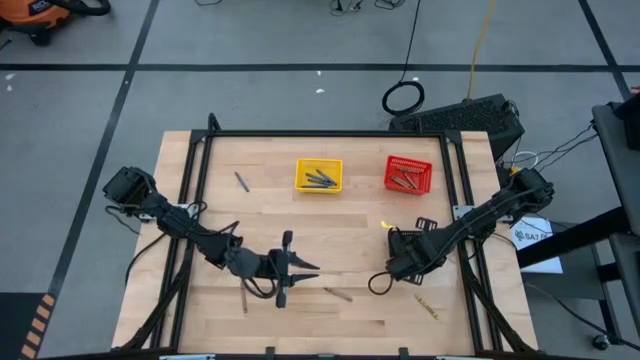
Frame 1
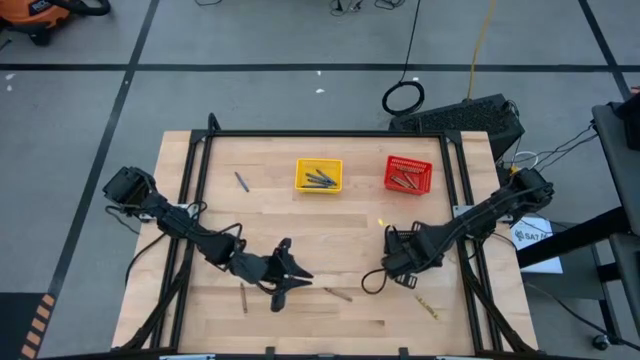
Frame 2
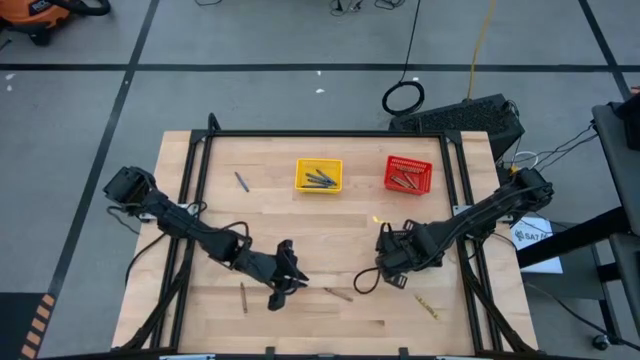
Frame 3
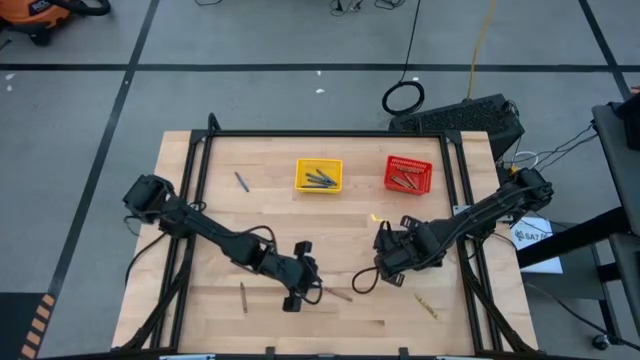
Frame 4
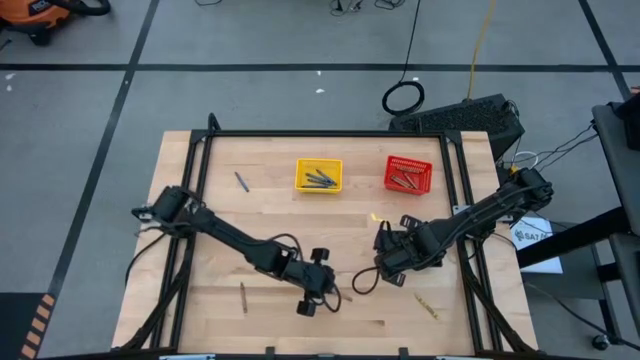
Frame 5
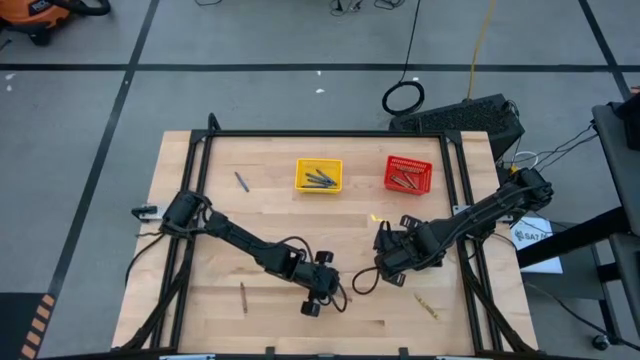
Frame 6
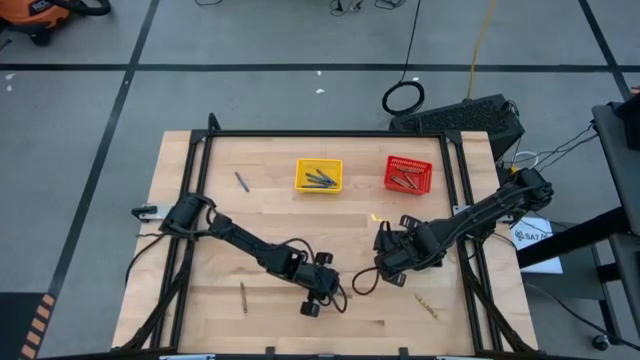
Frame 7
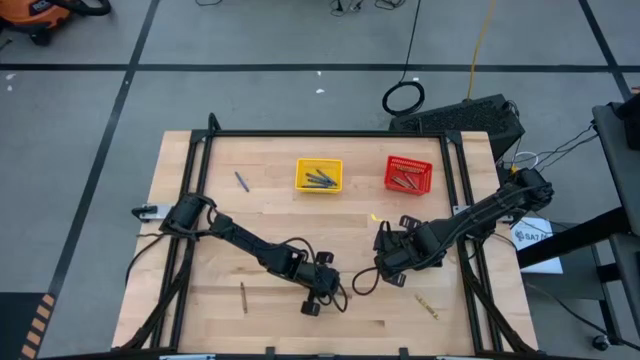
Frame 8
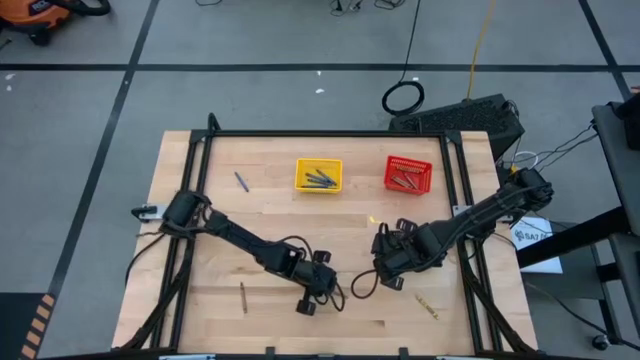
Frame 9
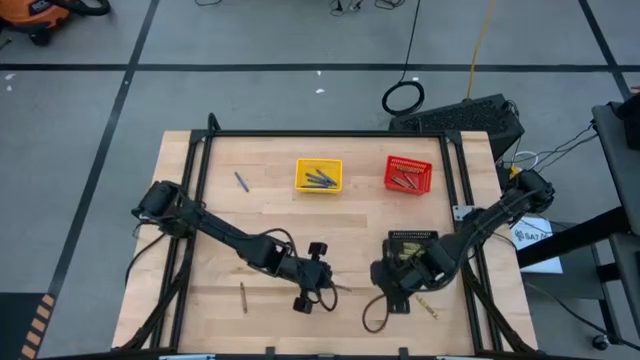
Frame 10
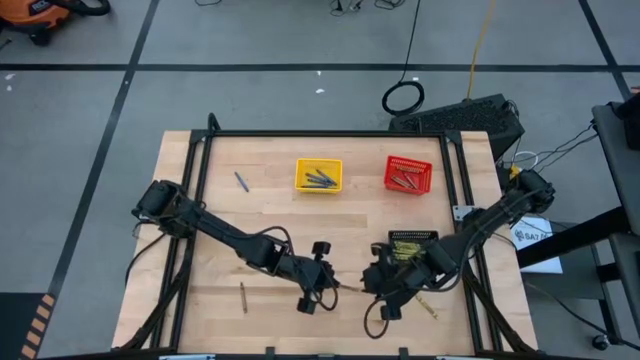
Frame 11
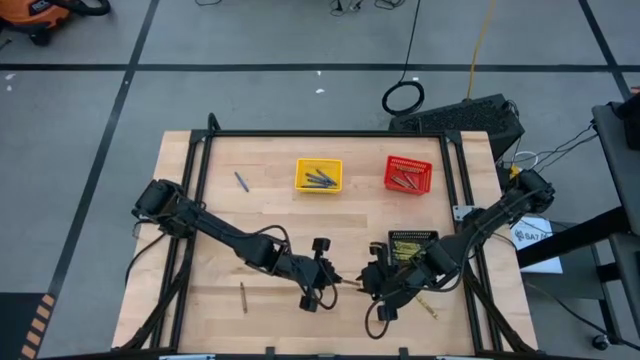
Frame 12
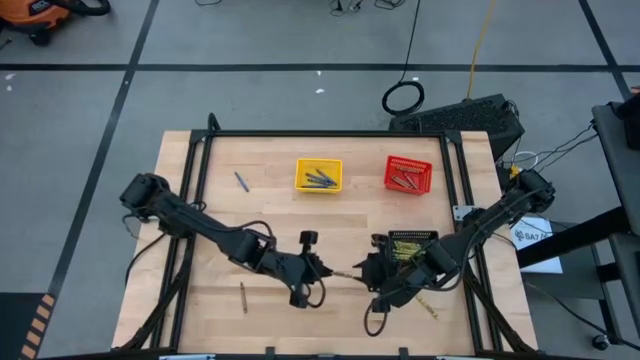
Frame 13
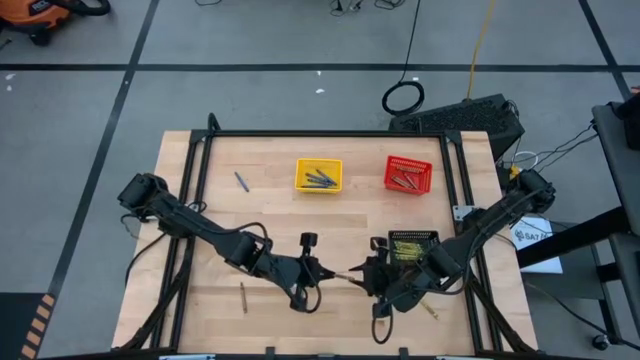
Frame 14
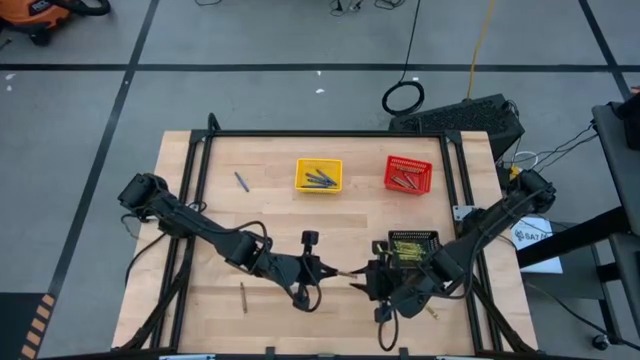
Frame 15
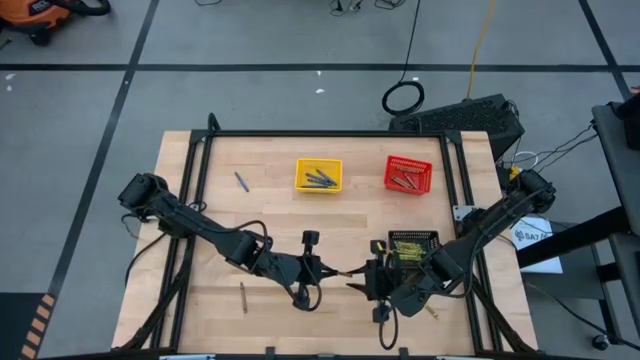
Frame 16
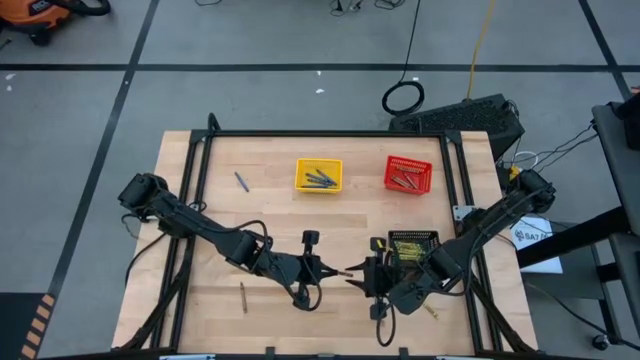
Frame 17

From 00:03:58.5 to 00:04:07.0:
Task: Sort crayons
Put the brown crayon into the red bin

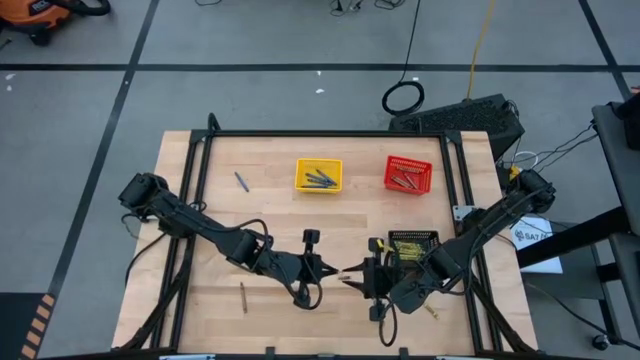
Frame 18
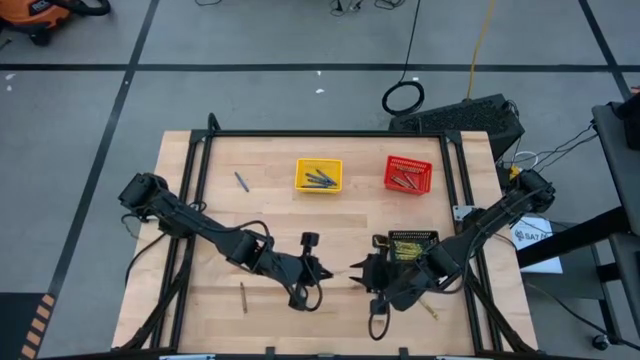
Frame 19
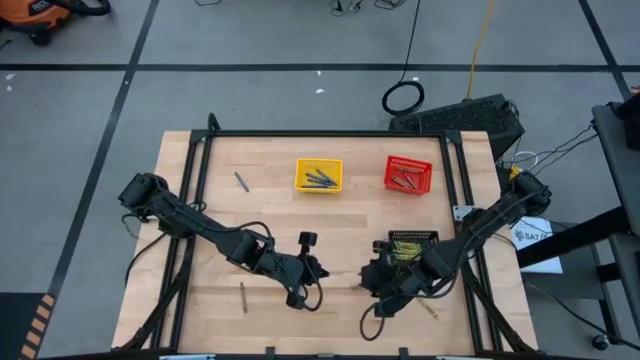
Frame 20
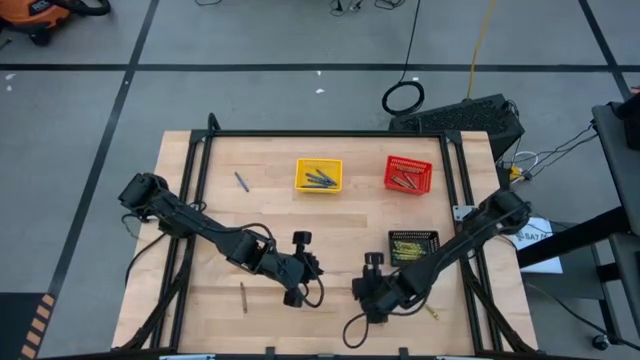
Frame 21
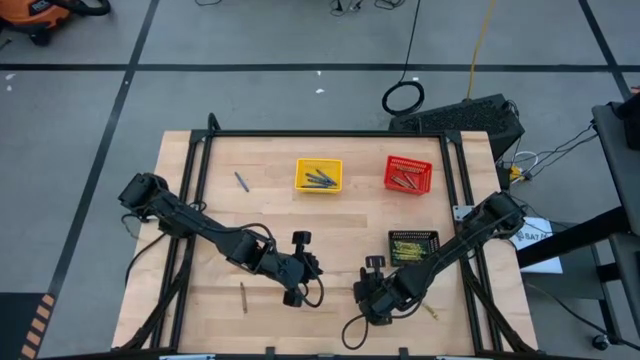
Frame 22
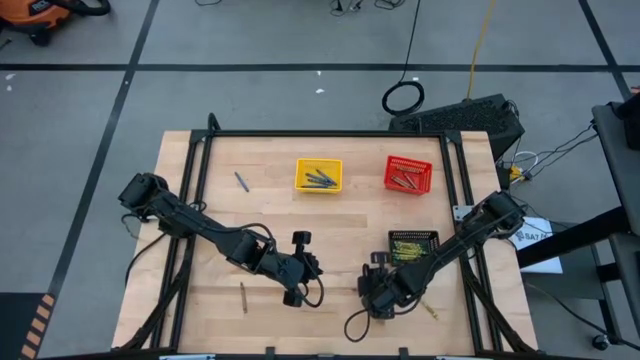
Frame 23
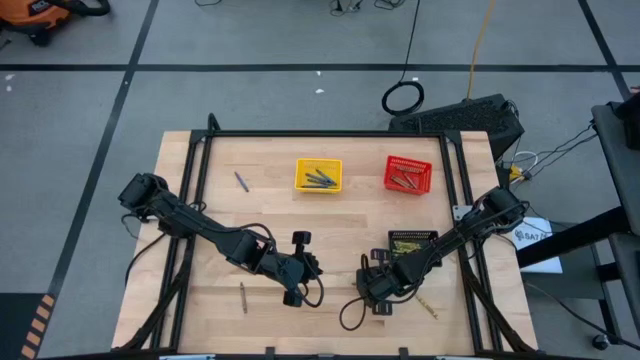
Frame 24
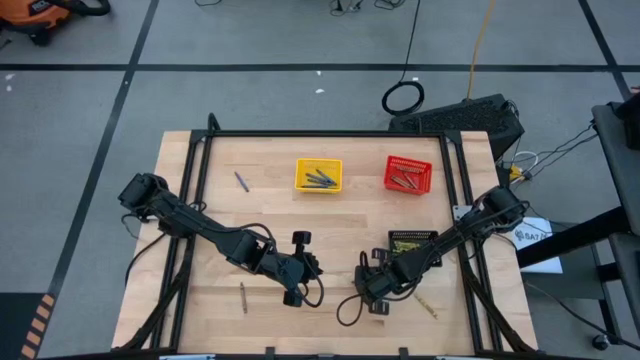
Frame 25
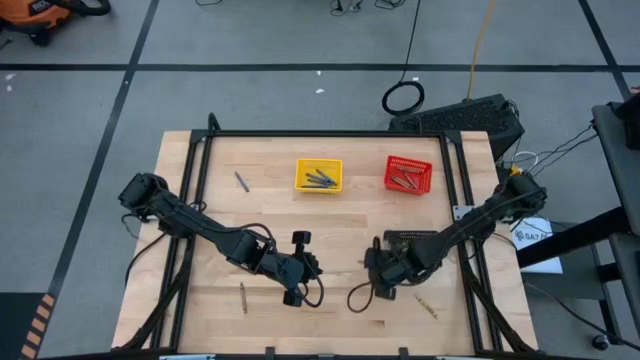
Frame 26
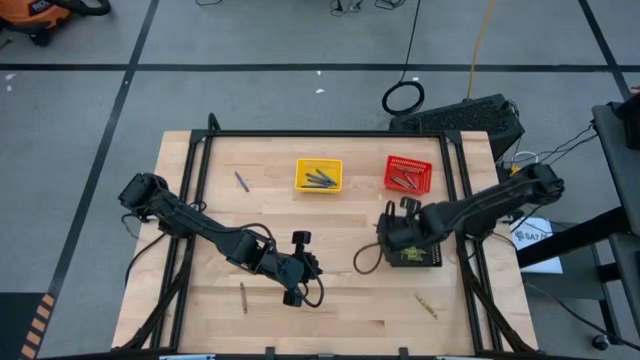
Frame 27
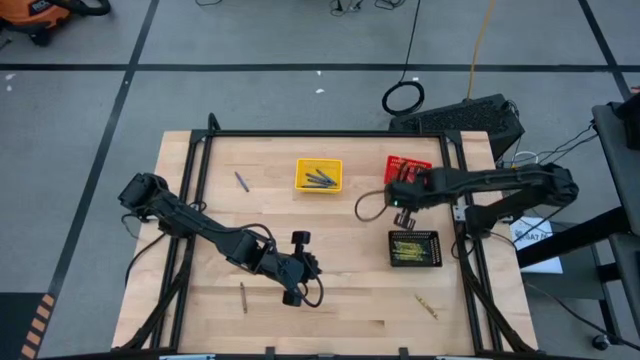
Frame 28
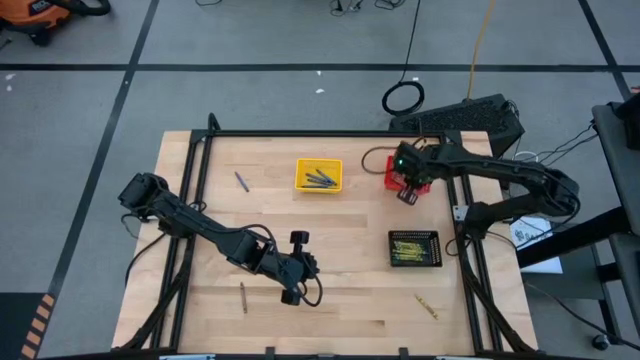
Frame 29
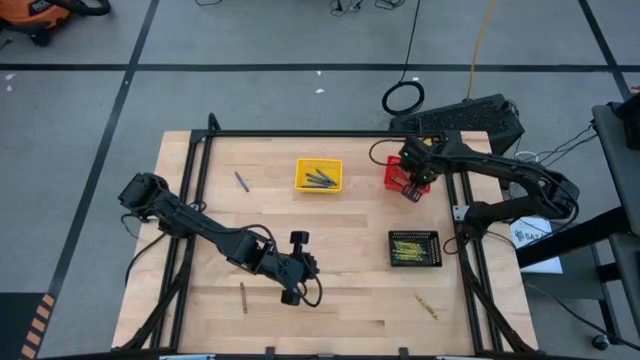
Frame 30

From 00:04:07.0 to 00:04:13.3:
Put the brown crayon into the red bin

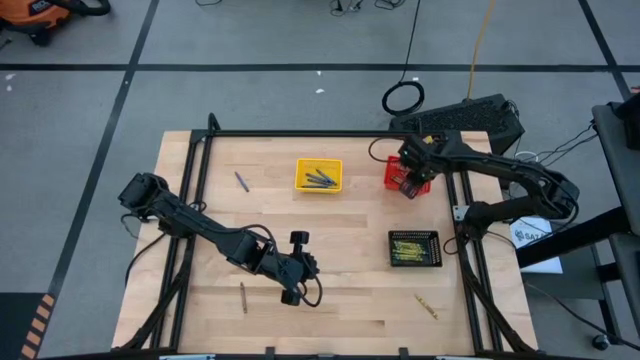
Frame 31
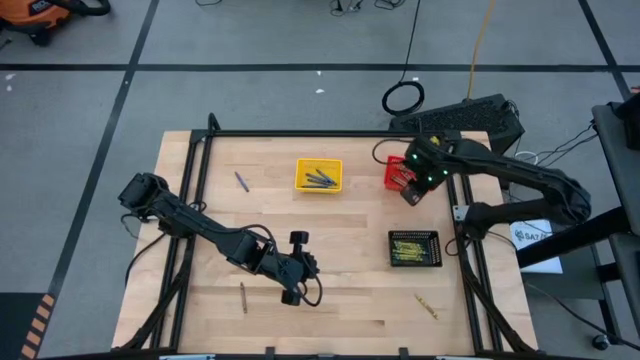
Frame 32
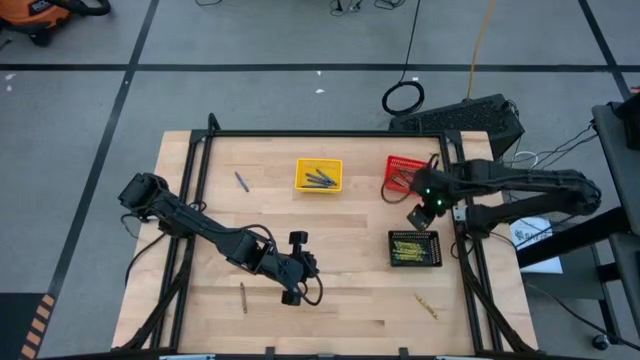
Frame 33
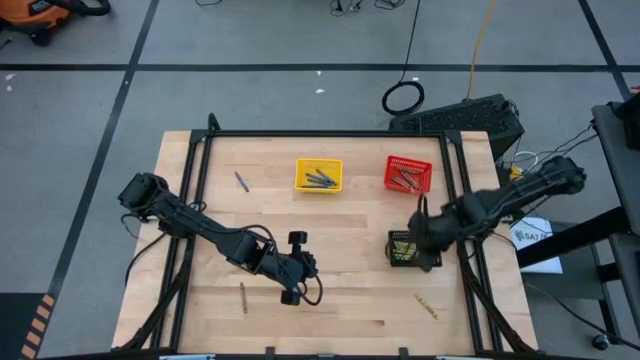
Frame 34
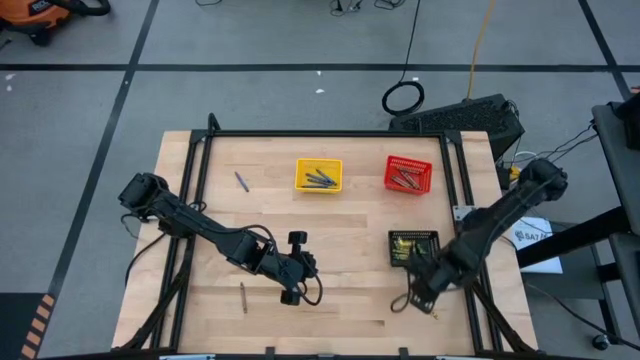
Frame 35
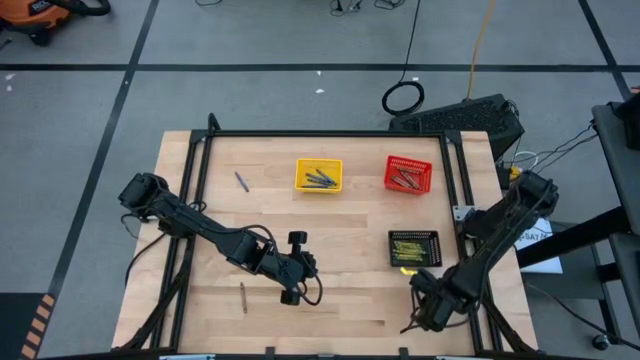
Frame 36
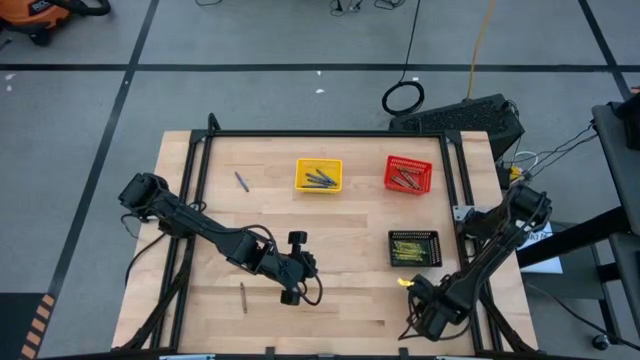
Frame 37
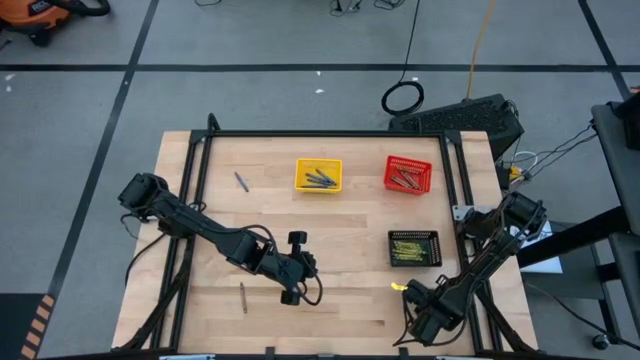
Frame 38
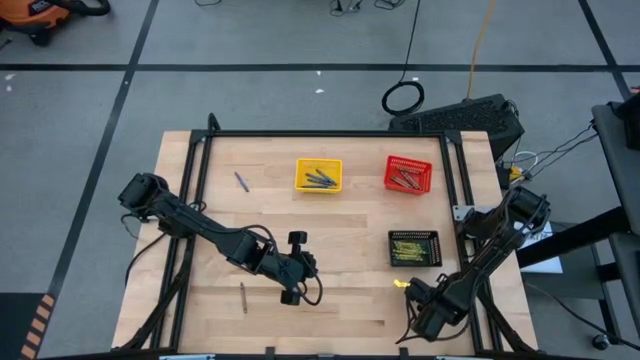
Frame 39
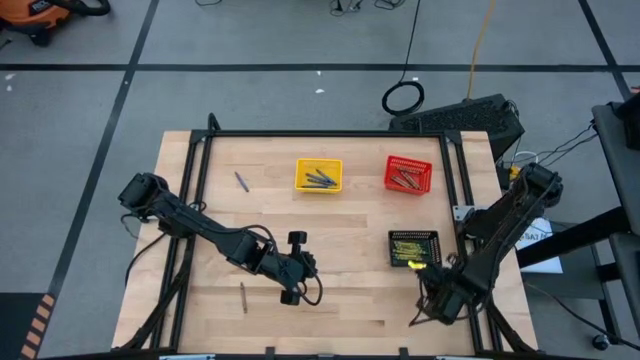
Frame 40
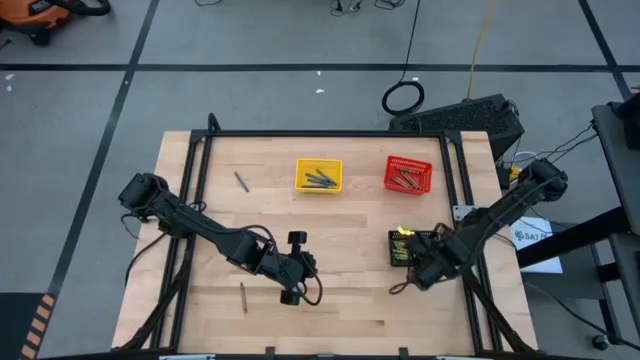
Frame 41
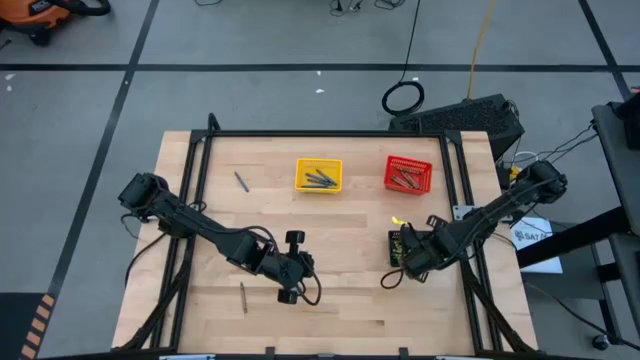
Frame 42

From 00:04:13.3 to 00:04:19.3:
Put the yellow green crayon into the black bin
